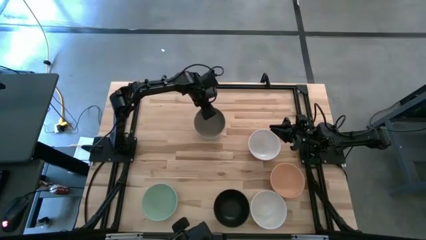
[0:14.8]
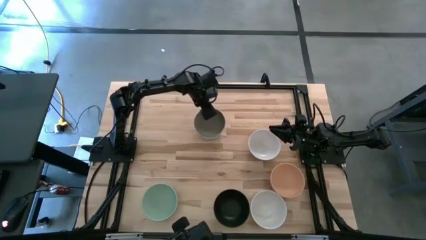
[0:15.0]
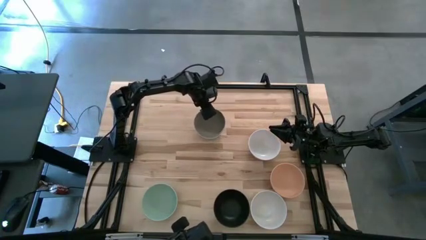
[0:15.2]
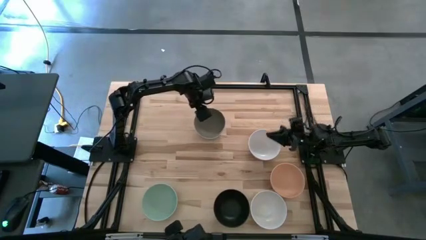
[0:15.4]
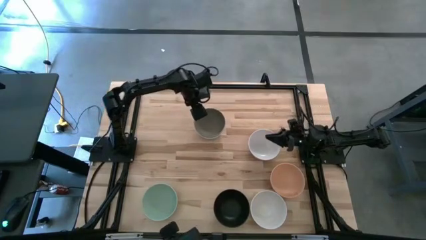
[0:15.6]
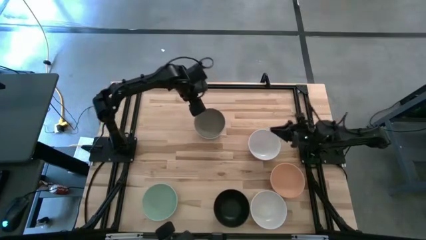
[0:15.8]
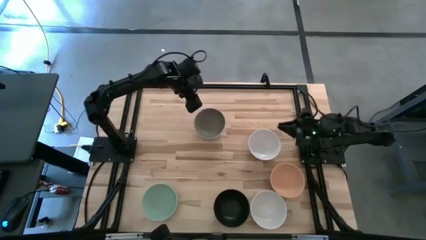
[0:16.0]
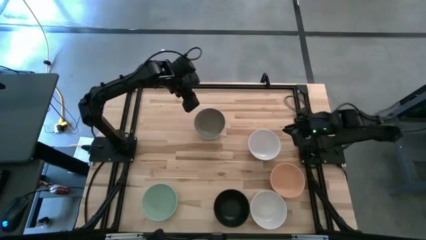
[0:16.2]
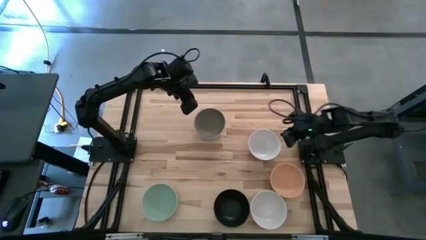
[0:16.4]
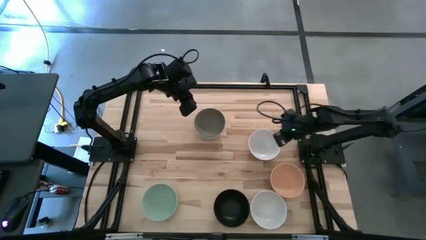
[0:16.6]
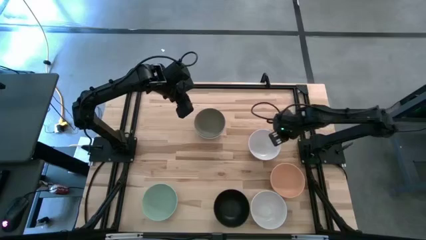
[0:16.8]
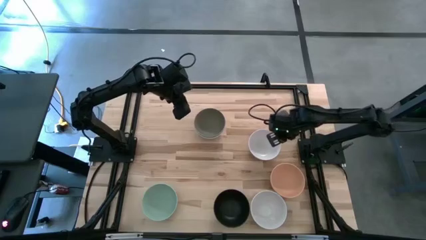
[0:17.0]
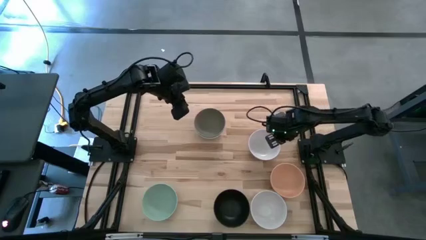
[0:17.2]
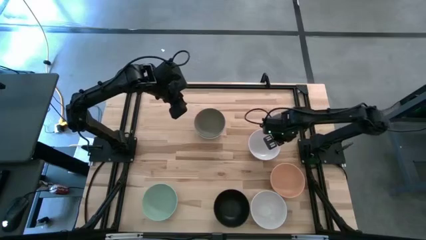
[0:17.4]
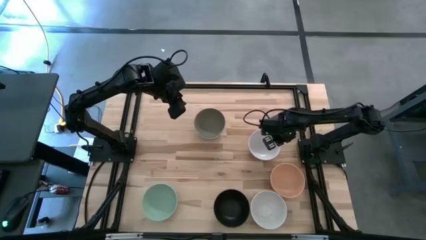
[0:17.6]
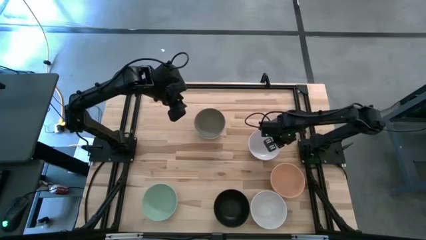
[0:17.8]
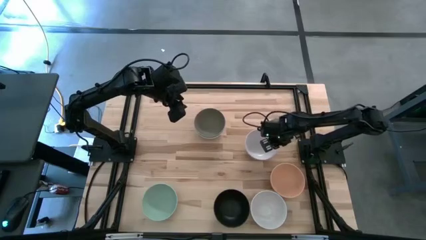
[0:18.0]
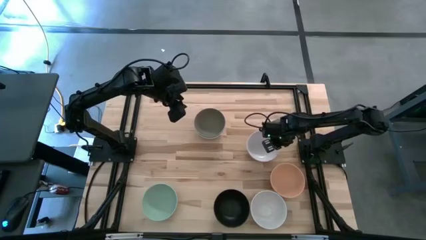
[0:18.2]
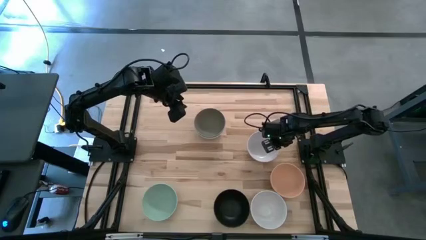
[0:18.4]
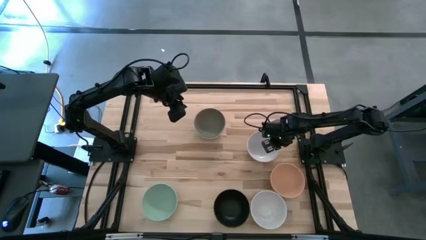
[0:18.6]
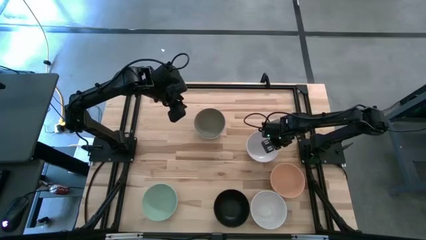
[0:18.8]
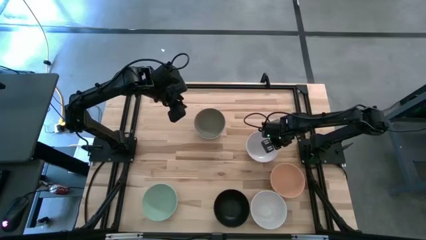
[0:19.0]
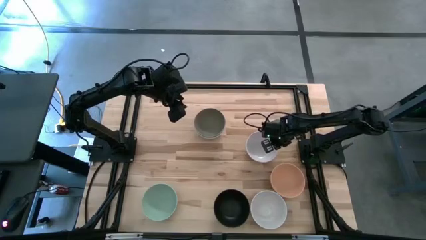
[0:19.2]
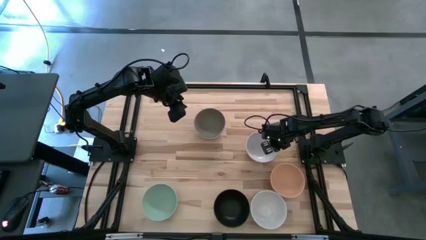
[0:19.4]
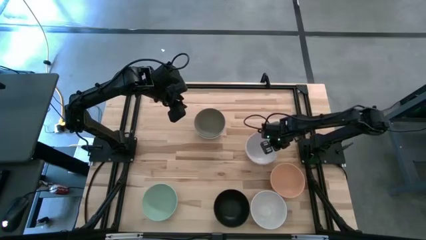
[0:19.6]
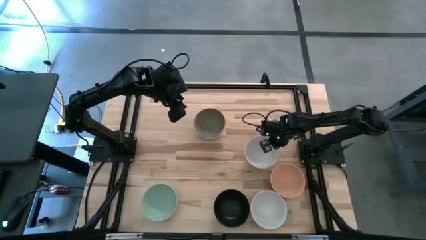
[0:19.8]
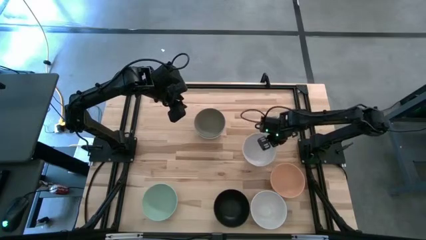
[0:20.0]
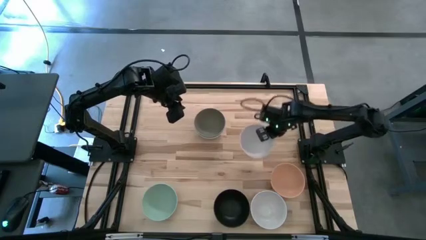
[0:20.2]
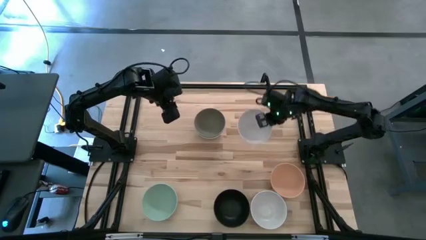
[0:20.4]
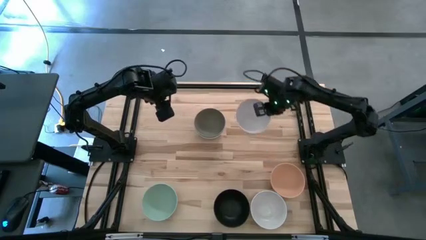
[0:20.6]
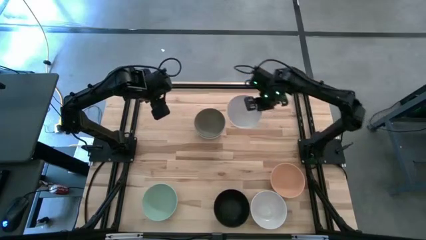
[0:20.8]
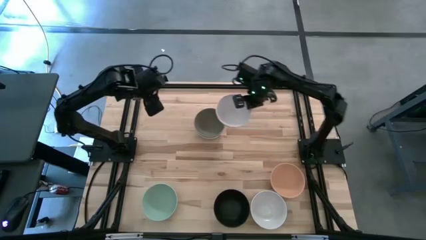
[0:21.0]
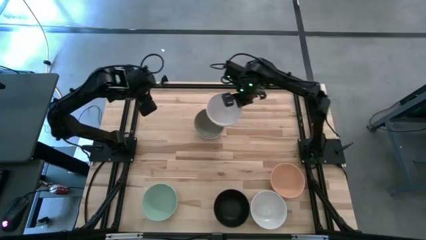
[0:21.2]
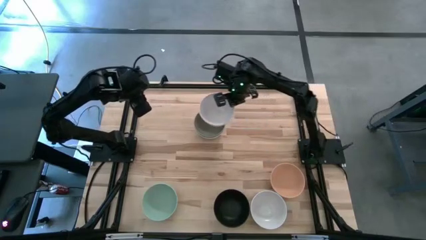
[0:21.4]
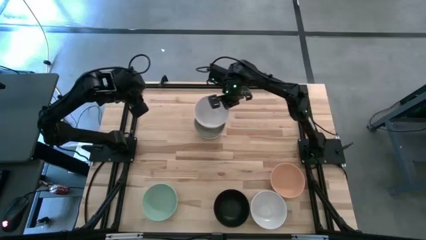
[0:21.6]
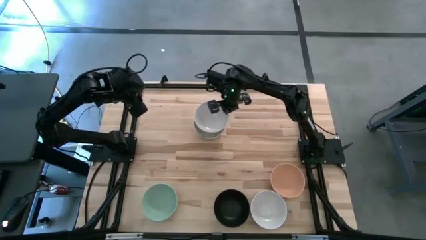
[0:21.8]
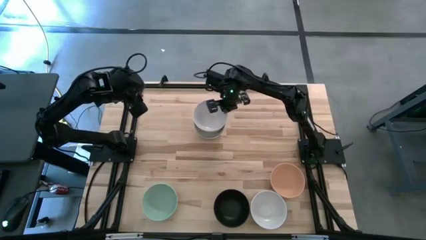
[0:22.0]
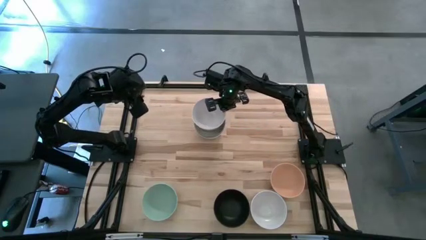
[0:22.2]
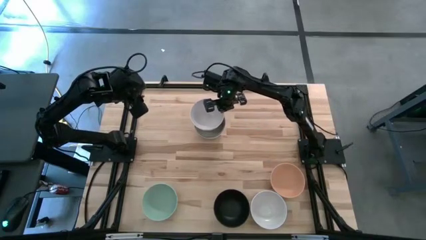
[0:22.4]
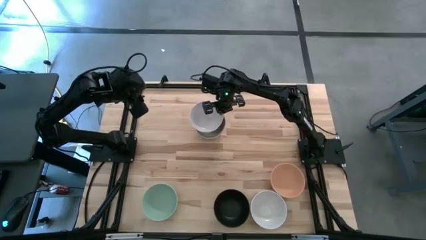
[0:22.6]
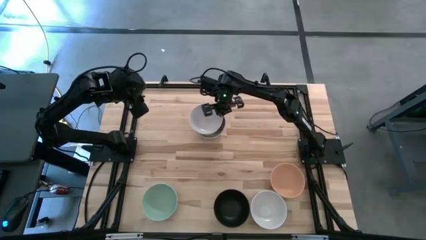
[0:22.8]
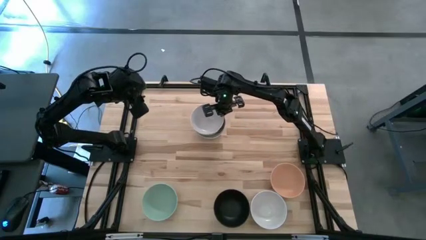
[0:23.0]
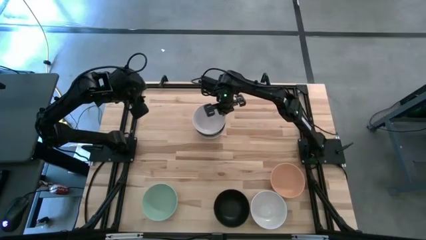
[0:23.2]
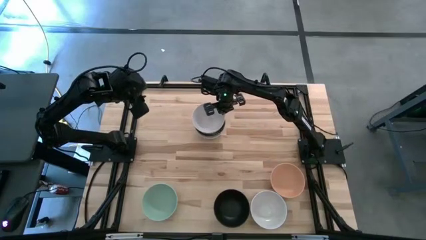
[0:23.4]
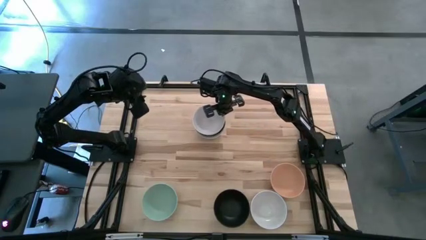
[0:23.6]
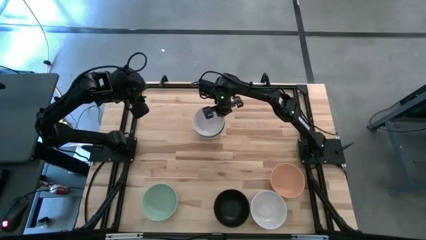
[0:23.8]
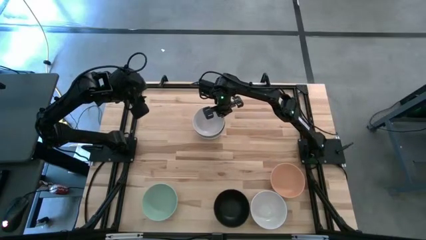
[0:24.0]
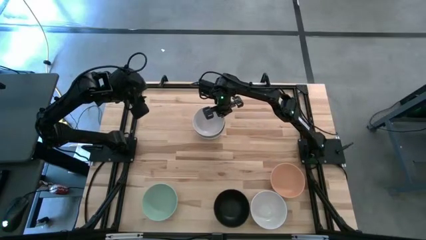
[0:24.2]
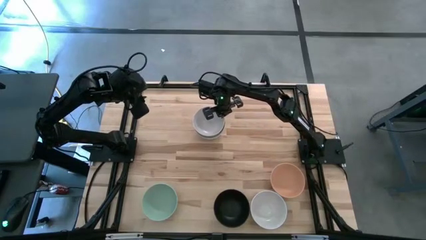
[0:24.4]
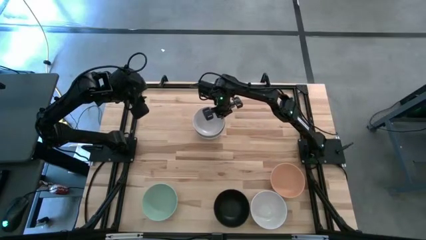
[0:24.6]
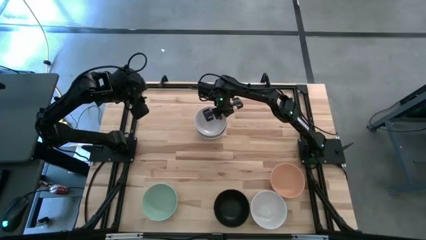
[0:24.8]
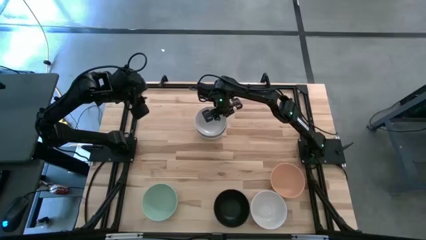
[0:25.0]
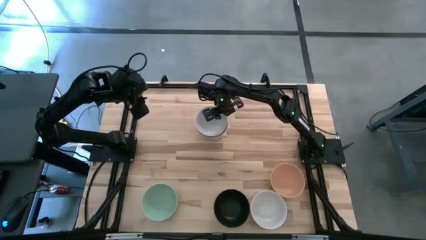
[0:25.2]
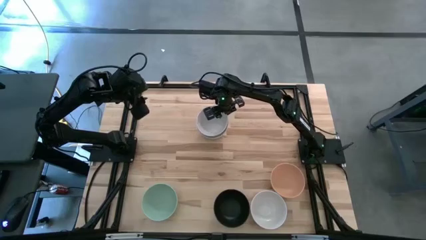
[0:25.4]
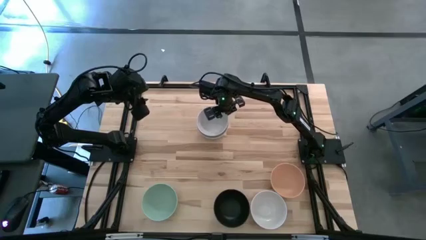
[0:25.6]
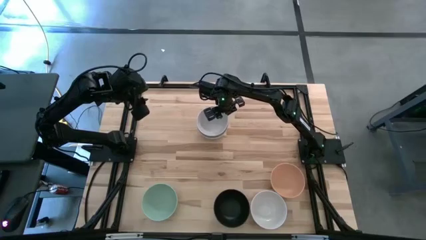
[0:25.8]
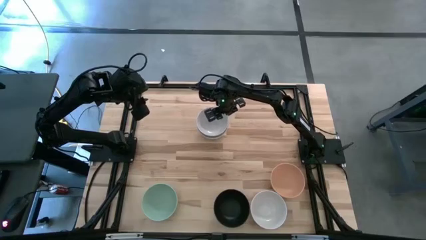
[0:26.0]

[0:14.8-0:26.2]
Task: Nest bowls inside each other
Stack the top white bowl on the gray bowl
